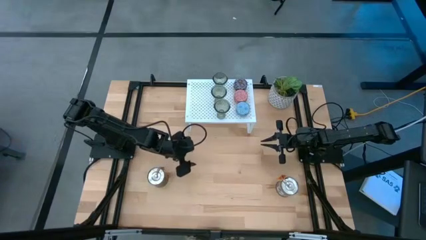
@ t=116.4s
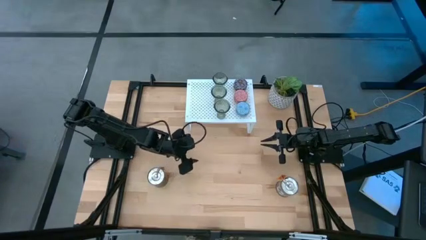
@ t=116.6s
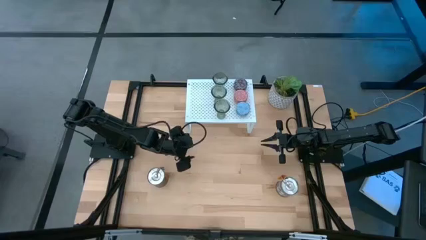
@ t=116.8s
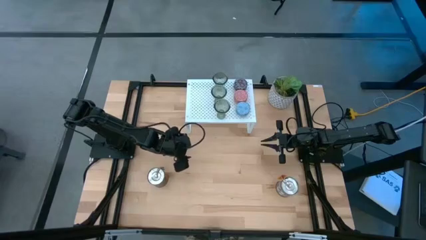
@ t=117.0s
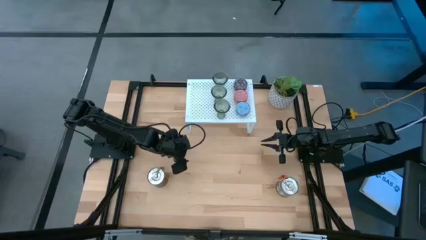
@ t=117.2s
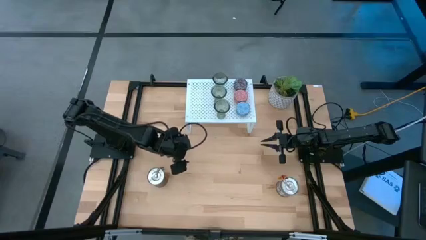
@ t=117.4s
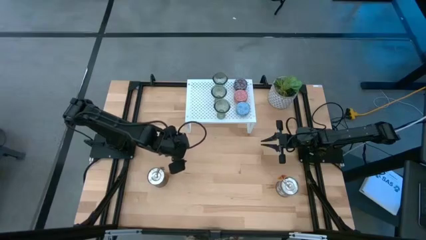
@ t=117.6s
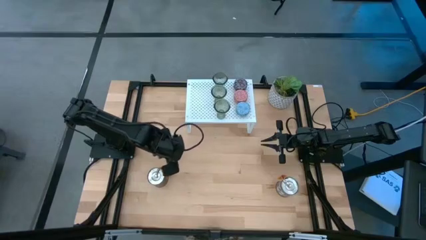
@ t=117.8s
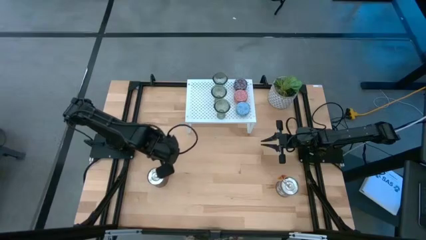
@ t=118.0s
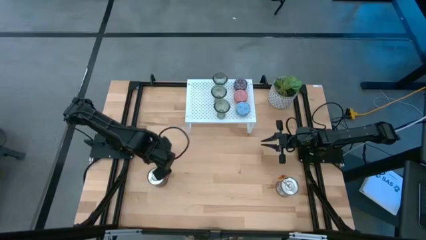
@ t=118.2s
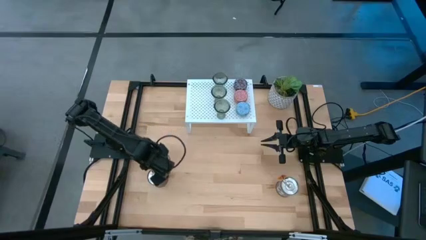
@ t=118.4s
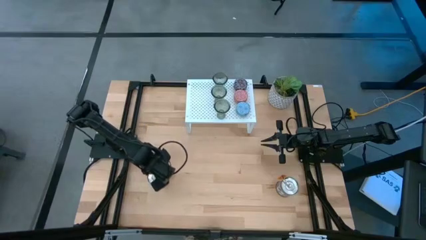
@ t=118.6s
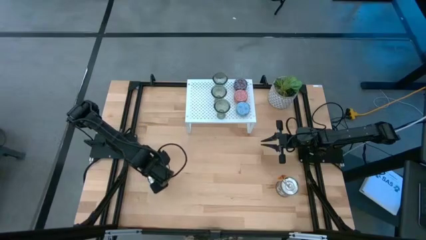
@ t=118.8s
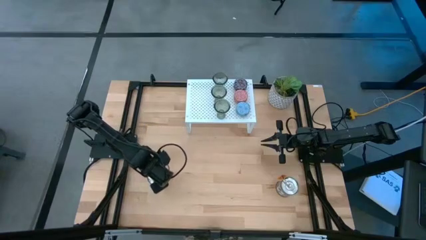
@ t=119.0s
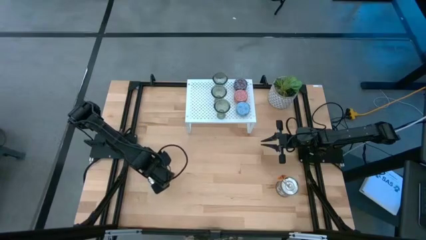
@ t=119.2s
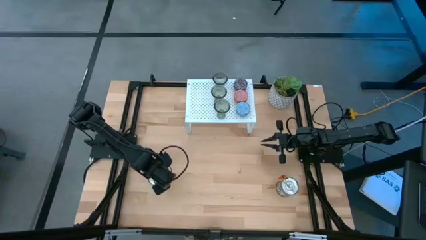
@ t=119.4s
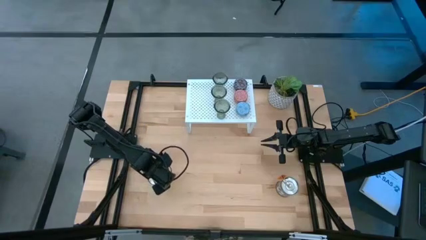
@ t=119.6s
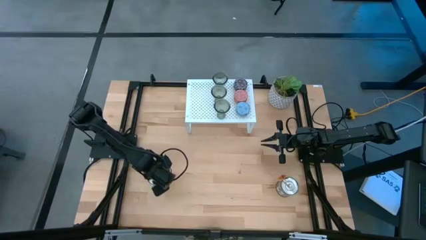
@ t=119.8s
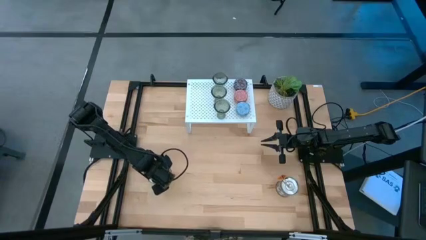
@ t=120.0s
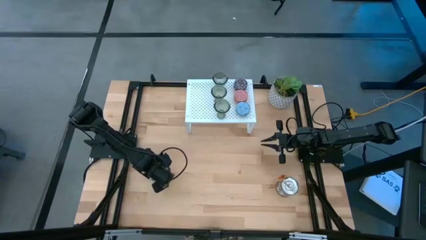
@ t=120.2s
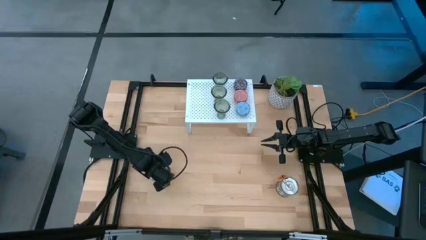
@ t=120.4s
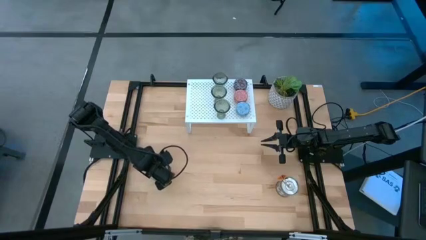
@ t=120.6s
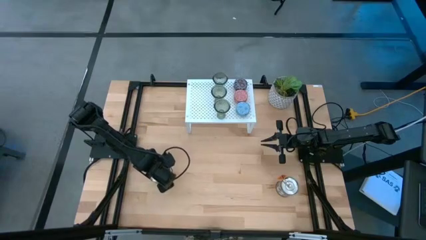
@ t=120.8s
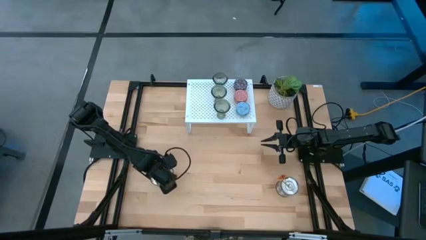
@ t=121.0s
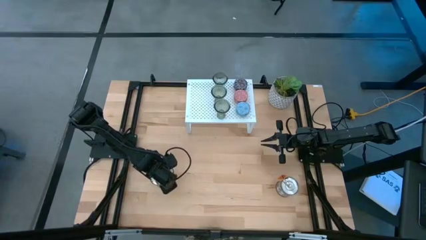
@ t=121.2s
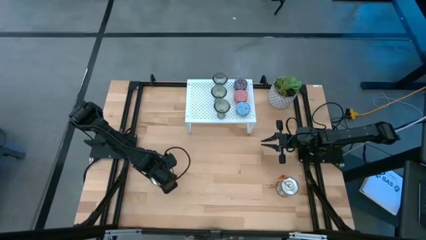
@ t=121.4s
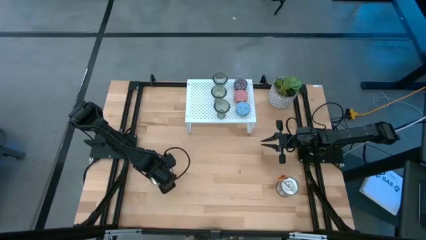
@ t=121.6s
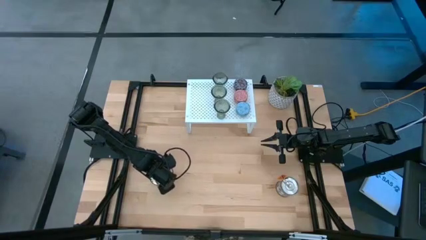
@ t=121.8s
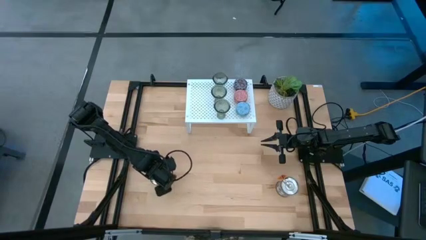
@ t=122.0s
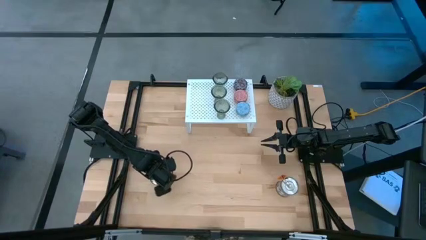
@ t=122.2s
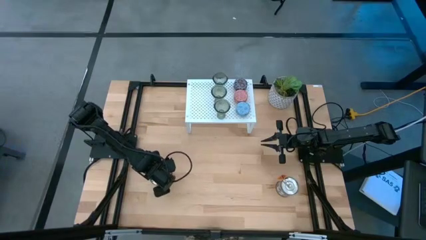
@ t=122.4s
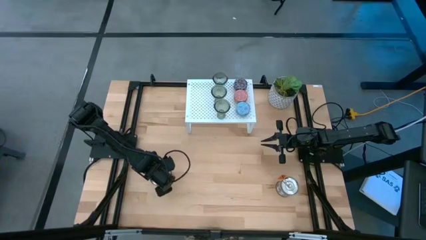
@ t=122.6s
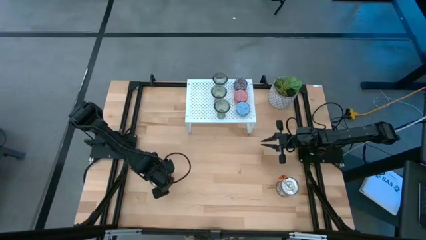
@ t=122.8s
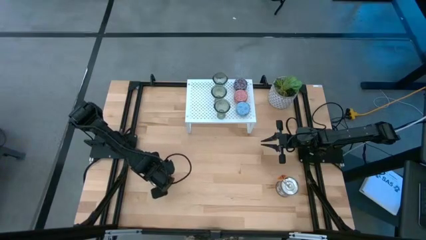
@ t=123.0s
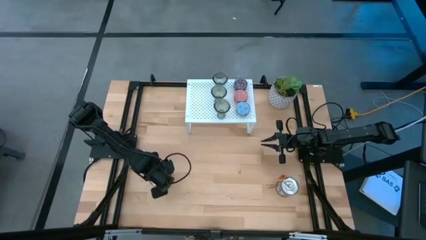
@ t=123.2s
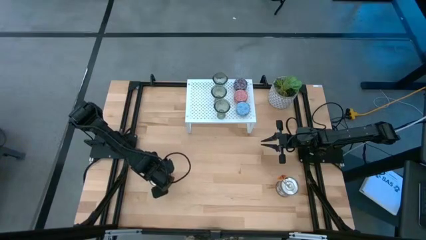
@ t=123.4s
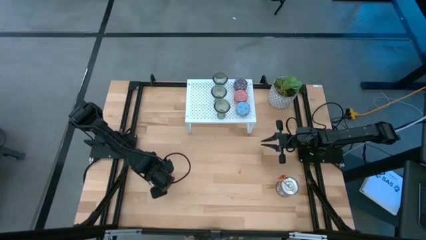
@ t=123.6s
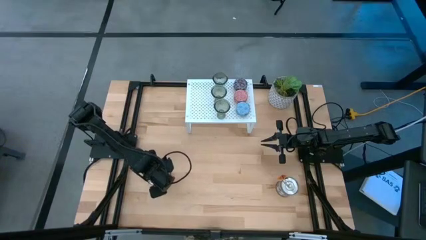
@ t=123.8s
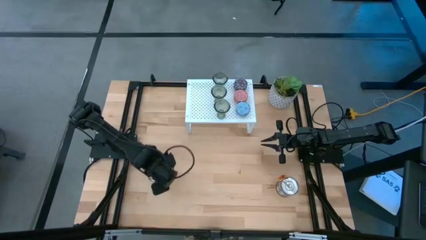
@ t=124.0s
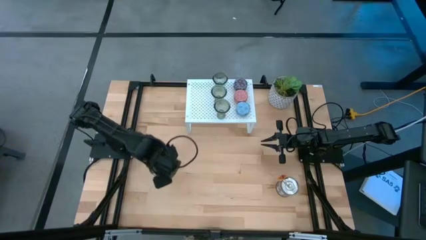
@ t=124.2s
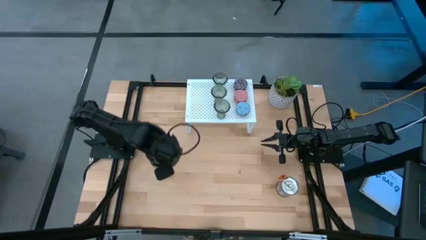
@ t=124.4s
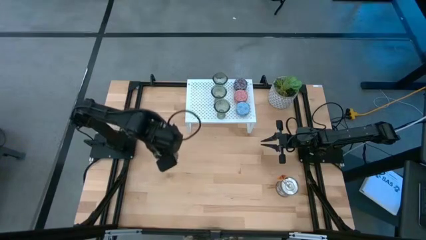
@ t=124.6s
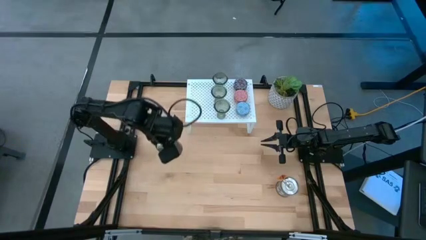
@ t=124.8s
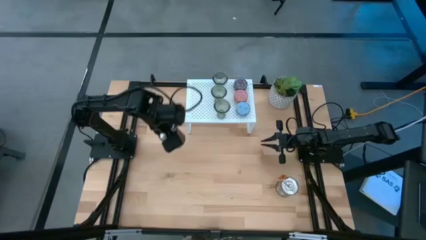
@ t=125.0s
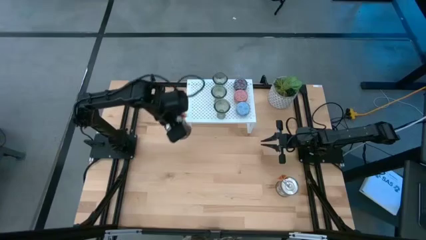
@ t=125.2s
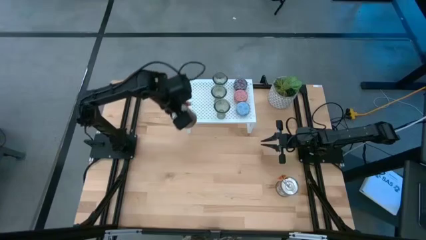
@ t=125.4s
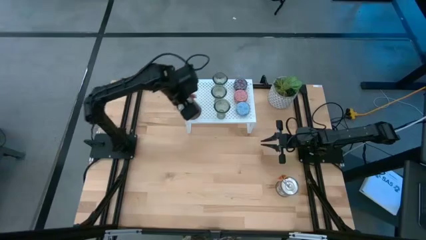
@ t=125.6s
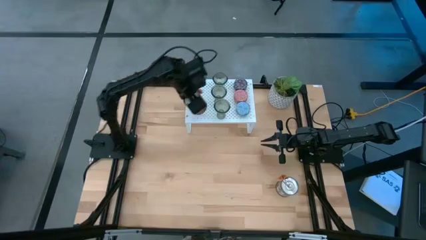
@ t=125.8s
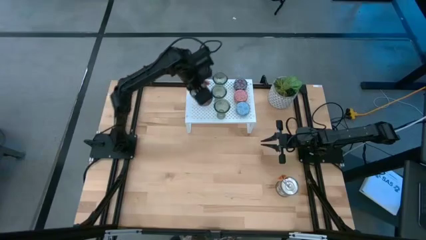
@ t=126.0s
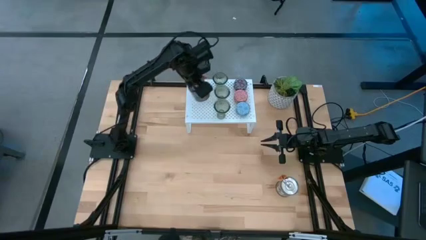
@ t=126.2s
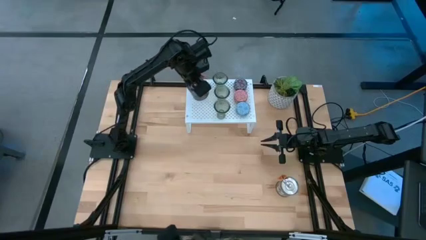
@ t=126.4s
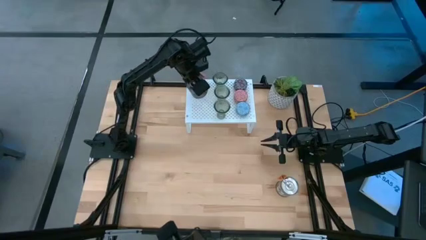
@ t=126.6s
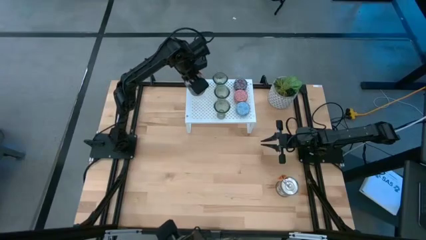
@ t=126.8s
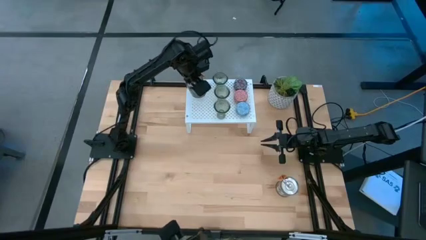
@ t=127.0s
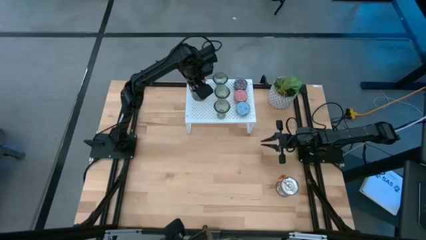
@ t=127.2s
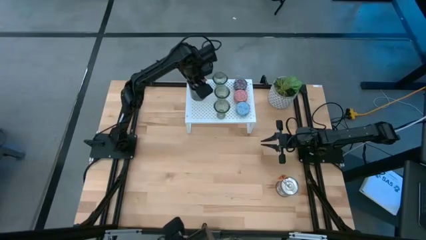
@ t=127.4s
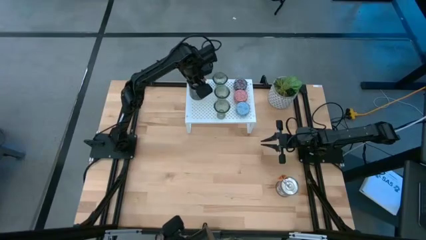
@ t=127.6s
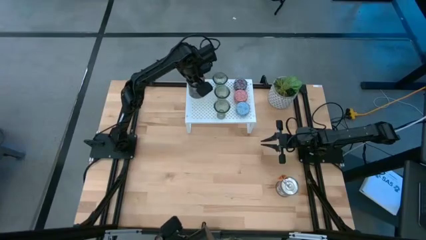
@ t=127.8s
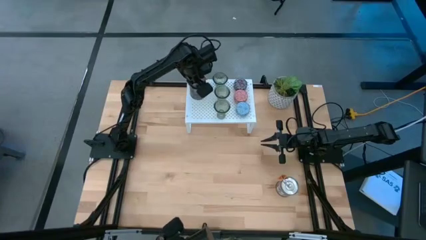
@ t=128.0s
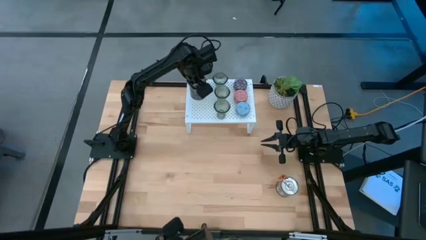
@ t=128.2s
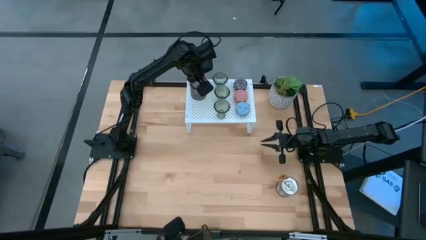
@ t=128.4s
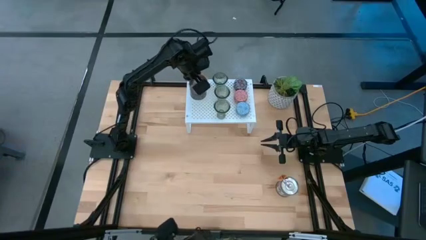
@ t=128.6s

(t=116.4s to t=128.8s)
Task: Pick & Place candle stick holders
Put the left silver scented candle on the shelf
